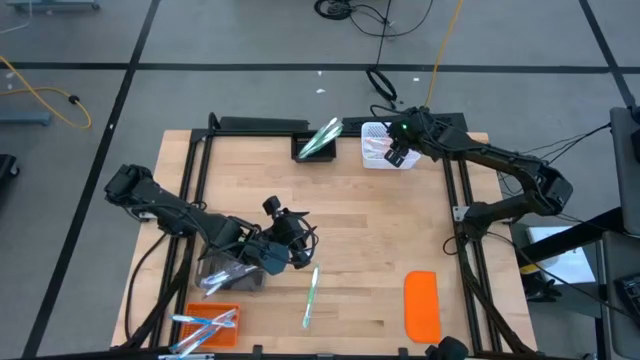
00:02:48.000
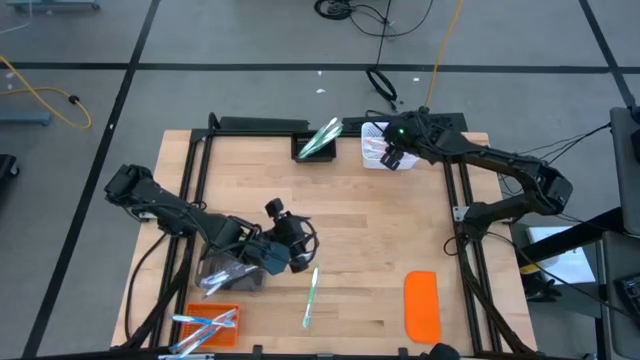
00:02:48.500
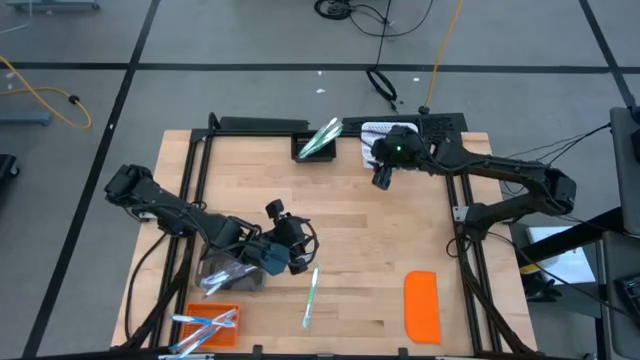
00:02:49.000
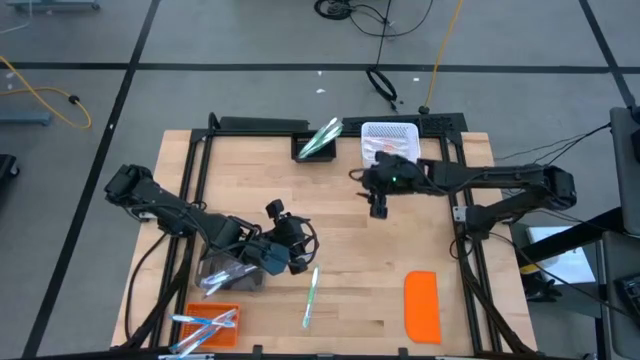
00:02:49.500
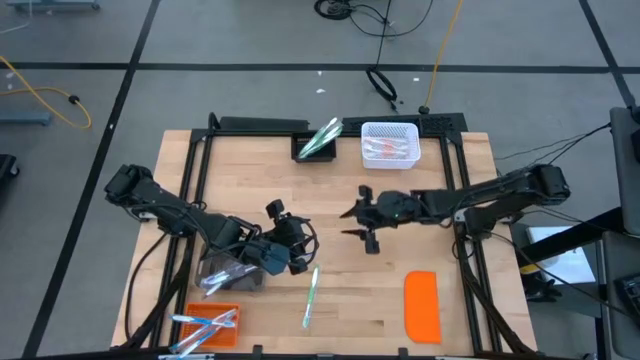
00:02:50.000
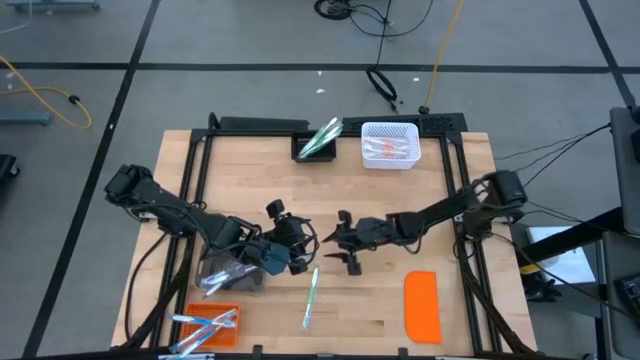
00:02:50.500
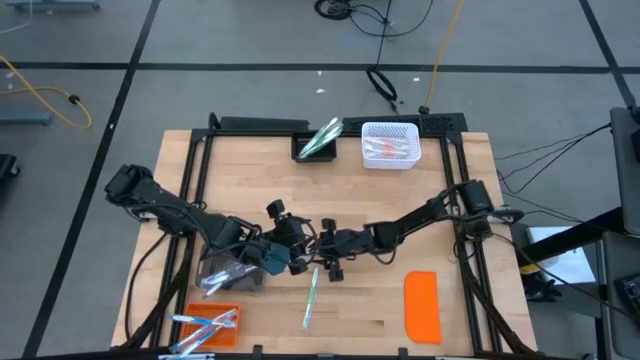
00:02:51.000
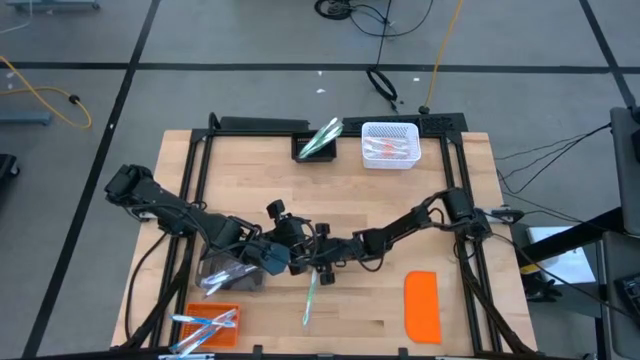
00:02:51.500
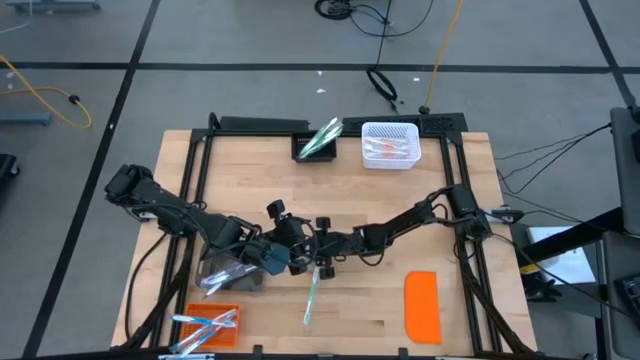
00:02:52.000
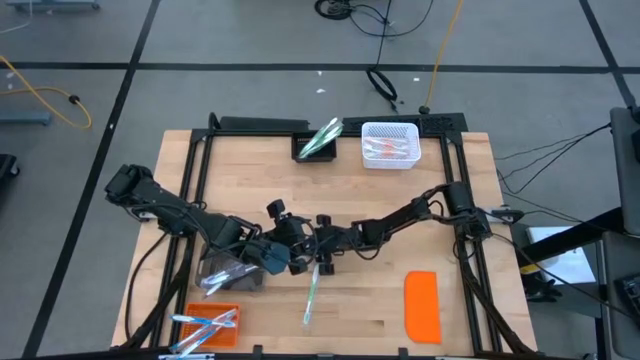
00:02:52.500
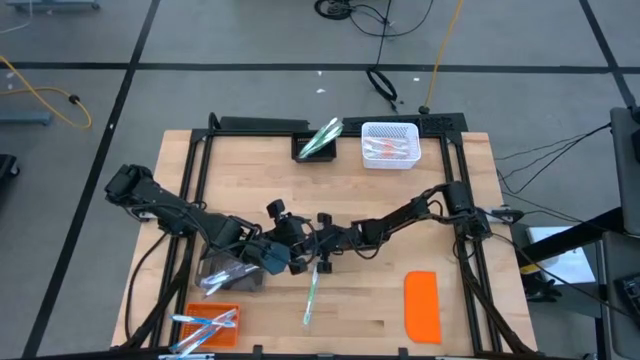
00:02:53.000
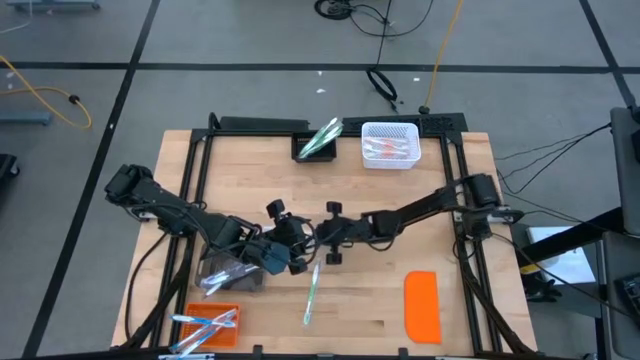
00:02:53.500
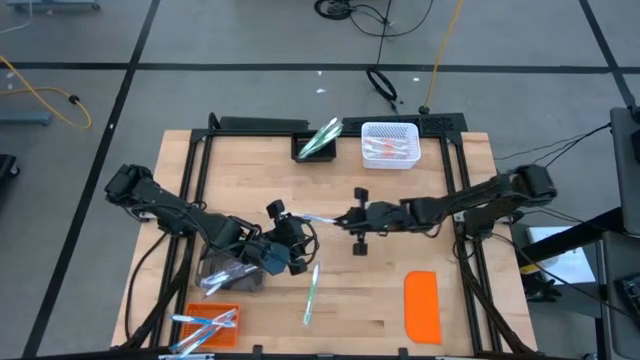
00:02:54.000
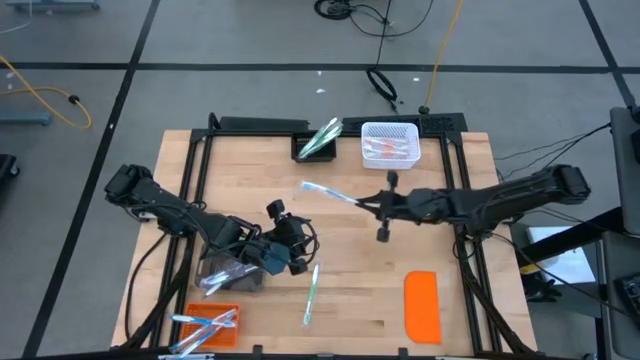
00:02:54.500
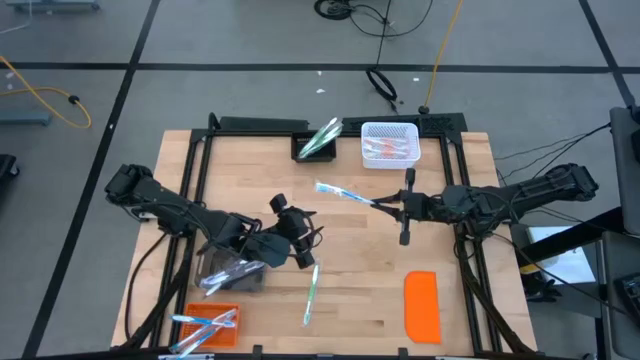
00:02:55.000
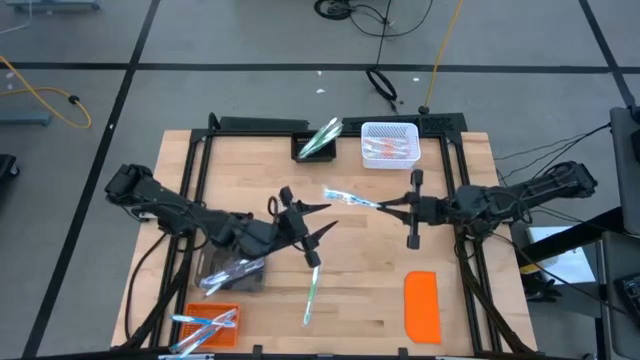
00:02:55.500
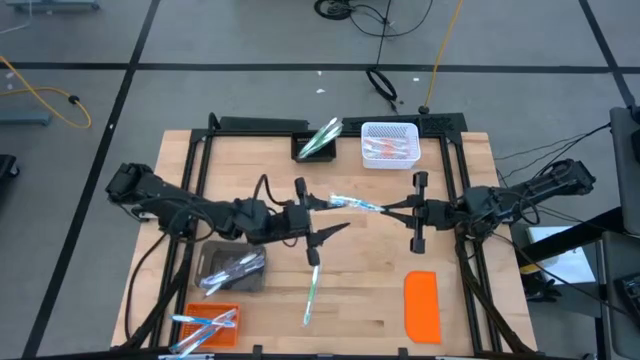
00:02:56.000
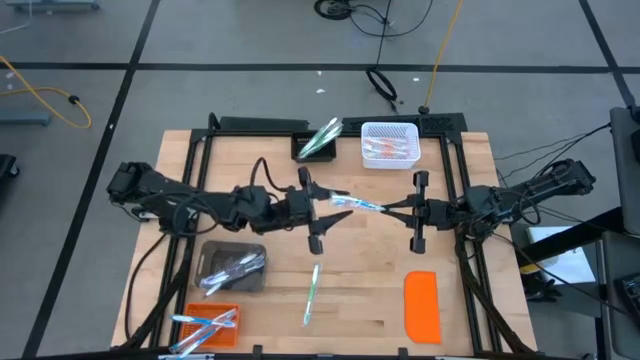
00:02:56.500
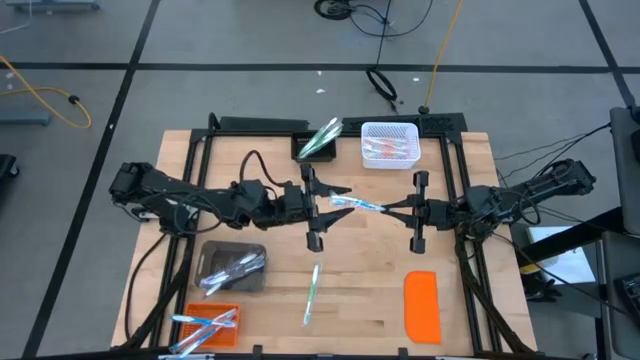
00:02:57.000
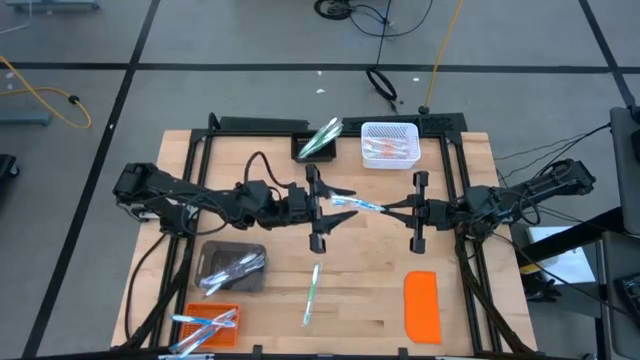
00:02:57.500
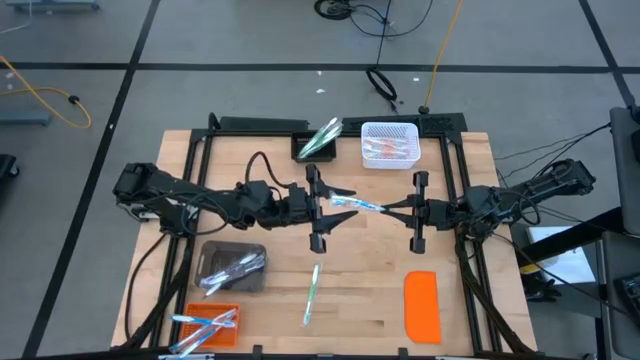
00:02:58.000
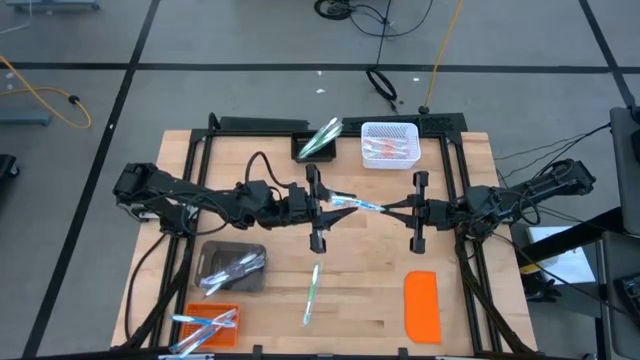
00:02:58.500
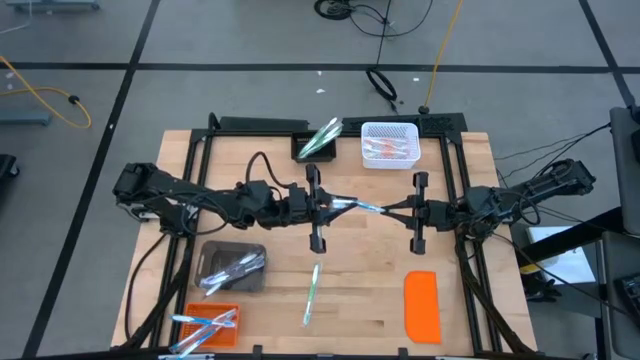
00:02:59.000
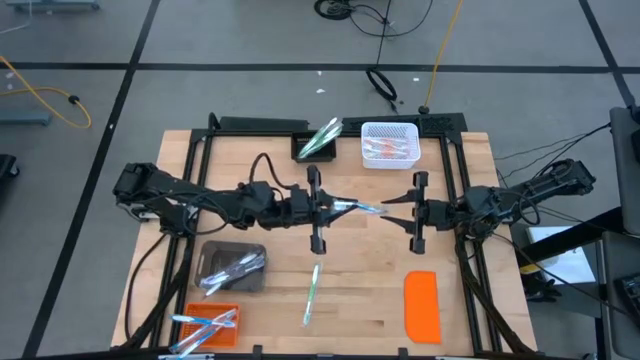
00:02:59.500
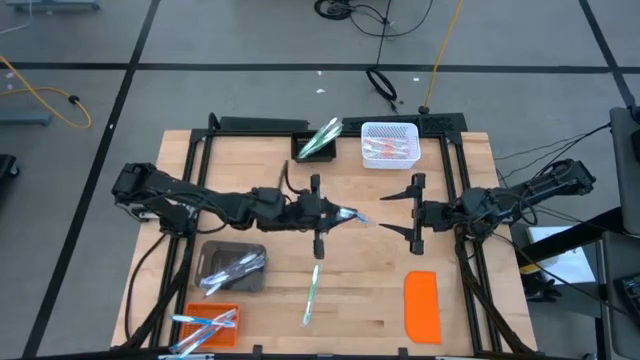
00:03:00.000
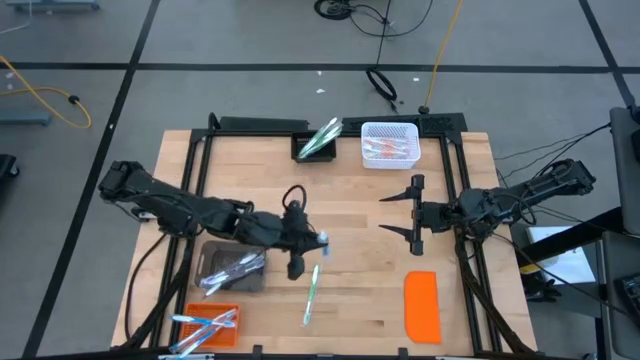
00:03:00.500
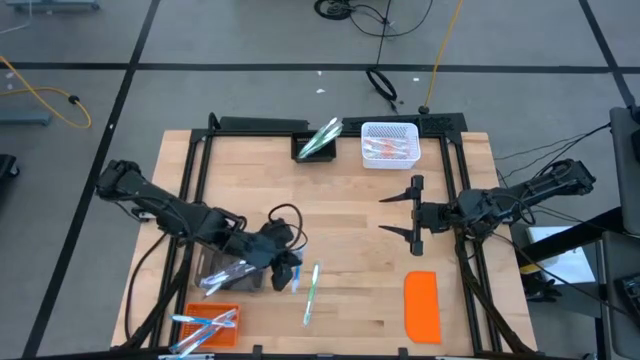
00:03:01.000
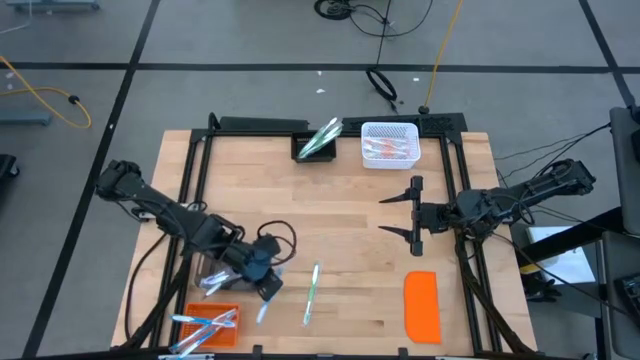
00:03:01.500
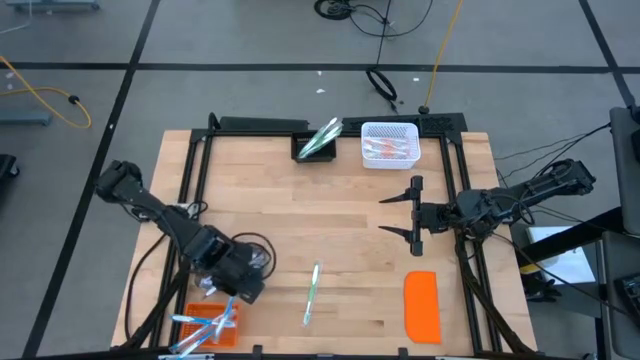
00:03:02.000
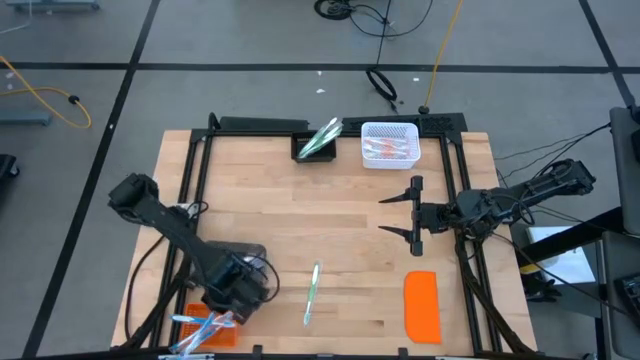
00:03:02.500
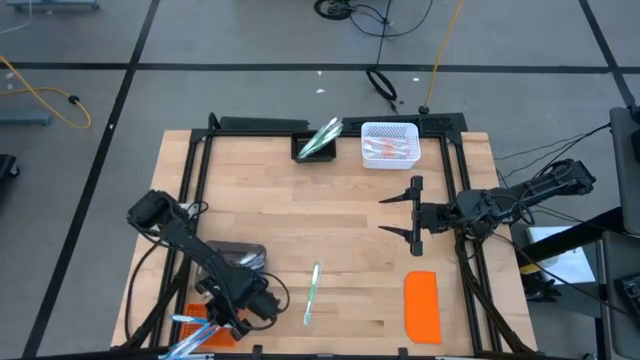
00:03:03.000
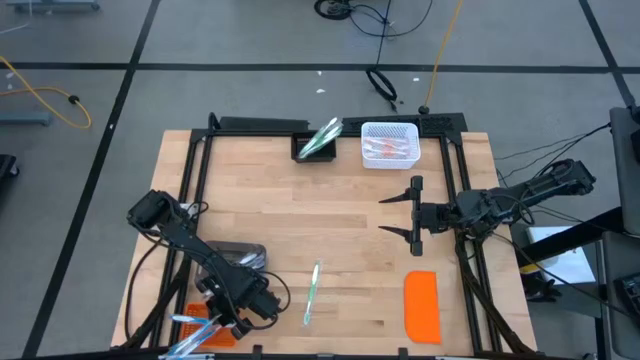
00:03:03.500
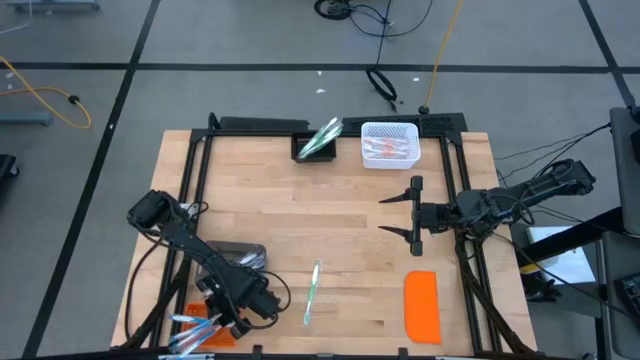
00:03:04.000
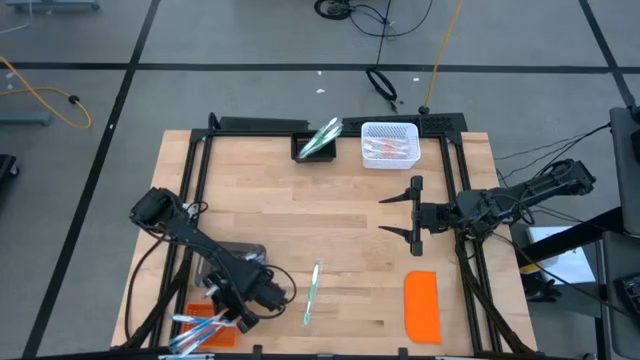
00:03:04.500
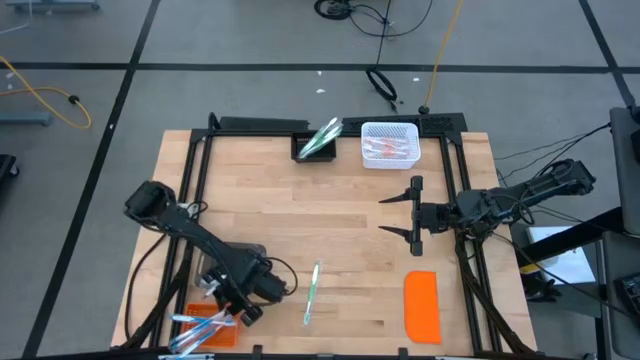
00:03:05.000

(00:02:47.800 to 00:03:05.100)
Task: Pick & Place Toothbrushes
Put the blue toothbrush into the orange bin

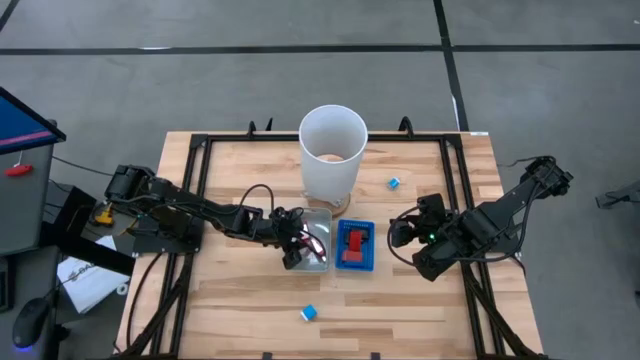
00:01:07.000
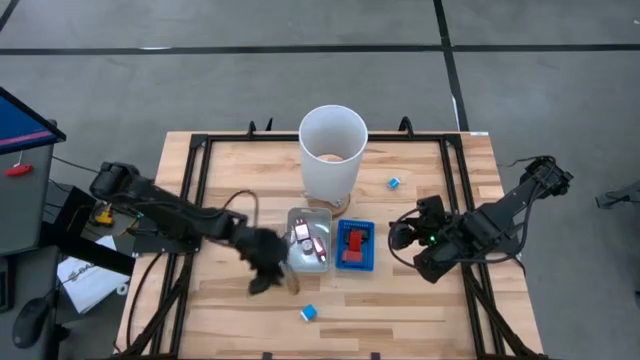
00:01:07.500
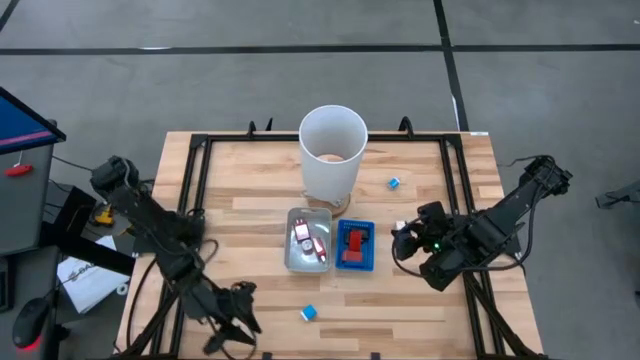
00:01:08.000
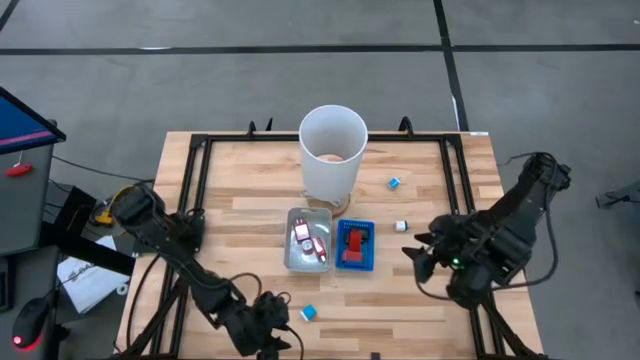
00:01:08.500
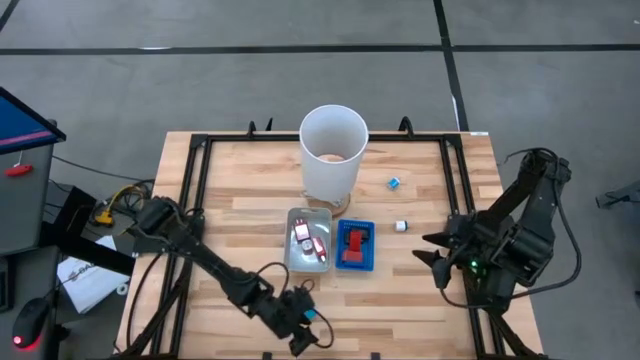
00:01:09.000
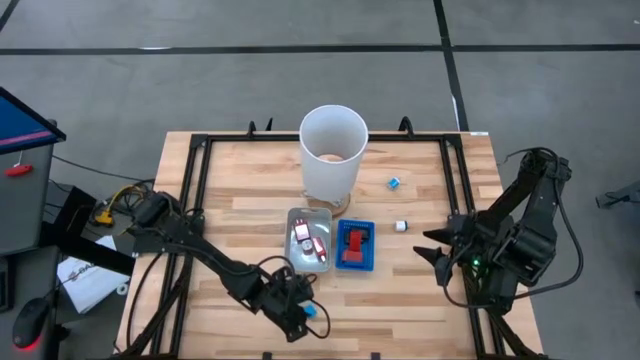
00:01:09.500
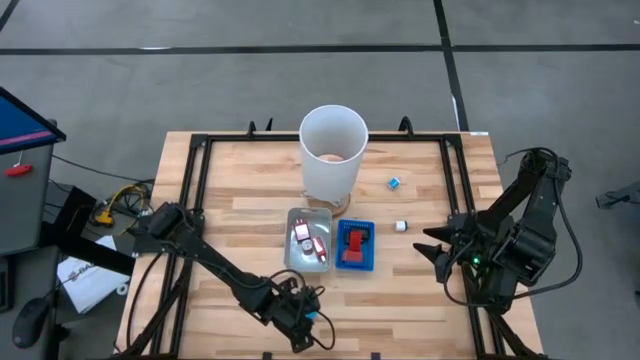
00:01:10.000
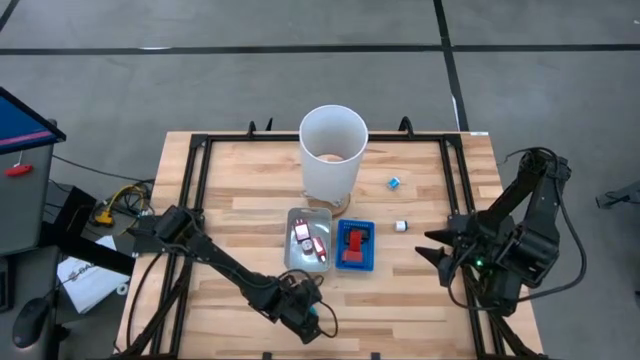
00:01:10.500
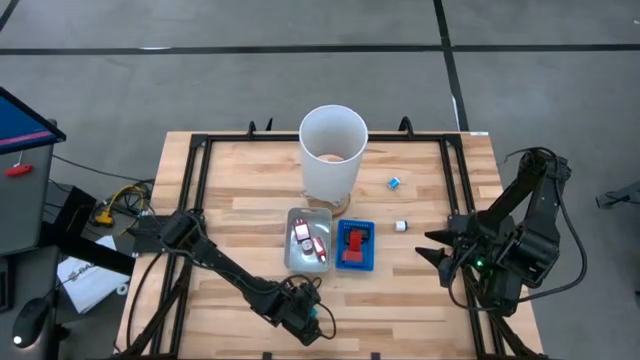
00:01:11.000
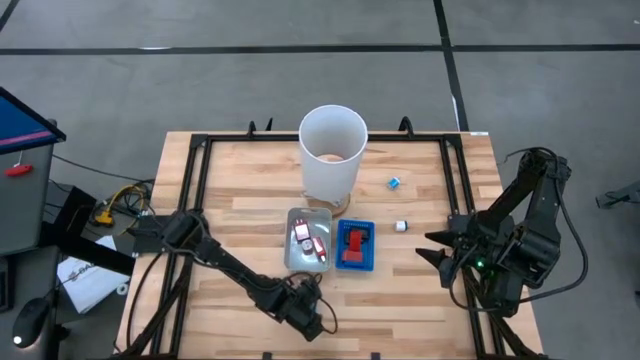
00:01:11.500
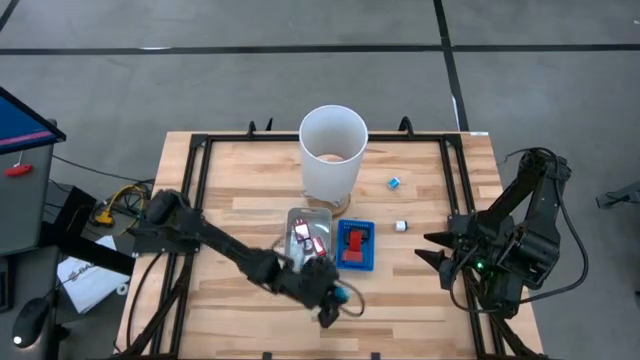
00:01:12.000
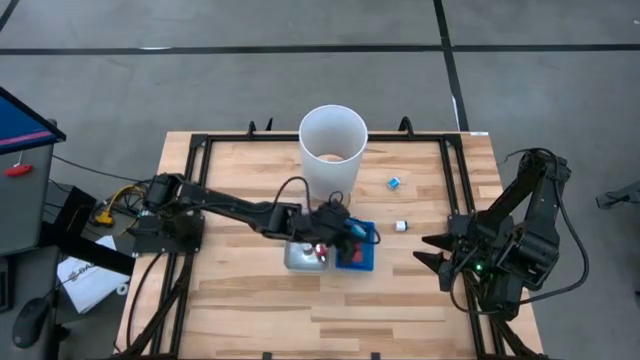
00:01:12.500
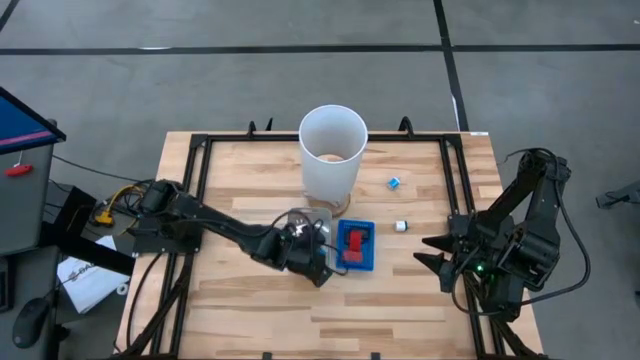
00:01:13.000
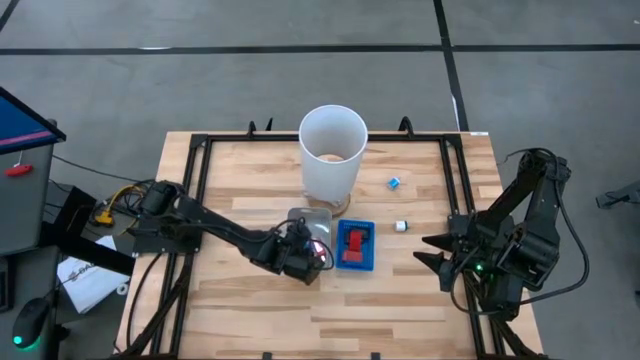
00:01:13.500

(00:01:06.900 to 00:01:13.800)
Task: Pick & Place Office items
Put the bottom blue charger adapter into the gray bin
